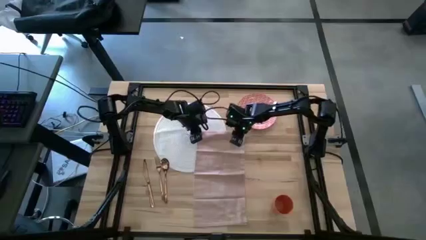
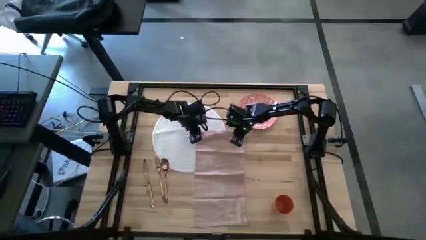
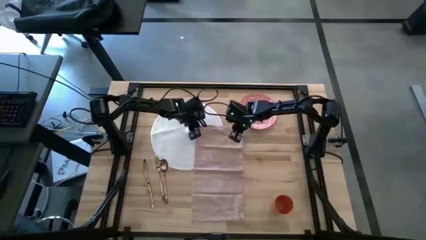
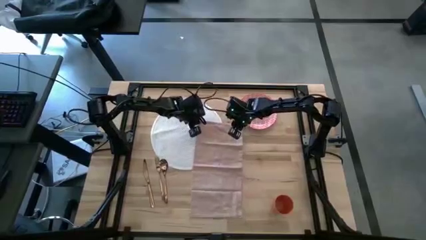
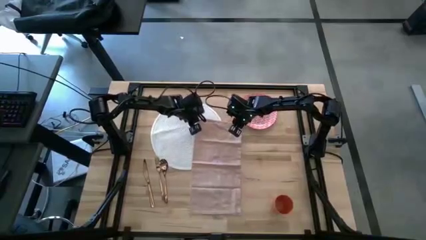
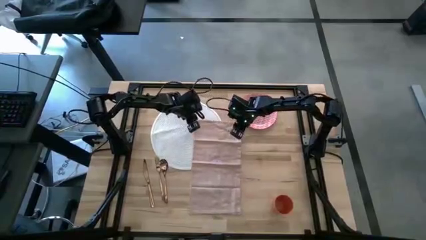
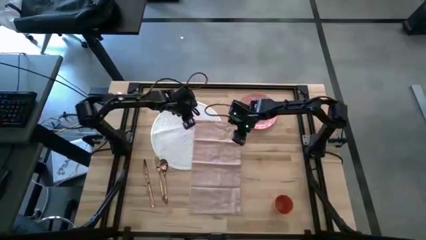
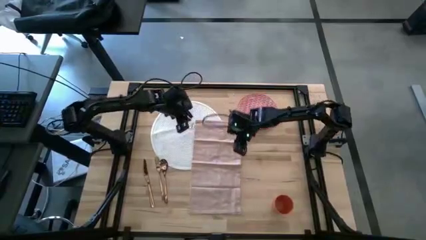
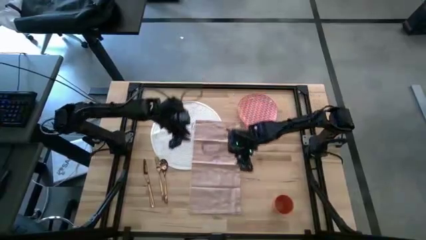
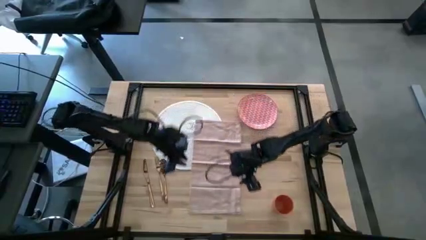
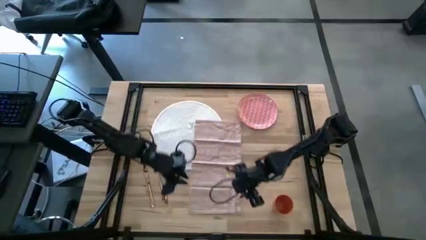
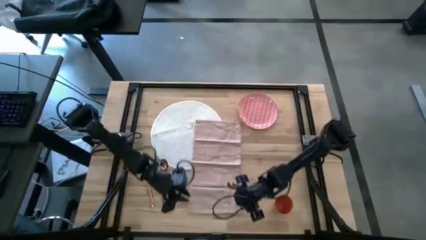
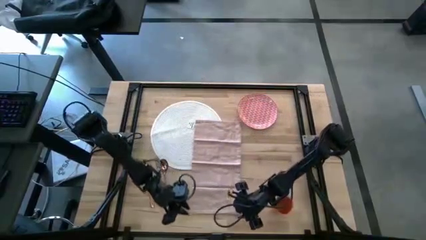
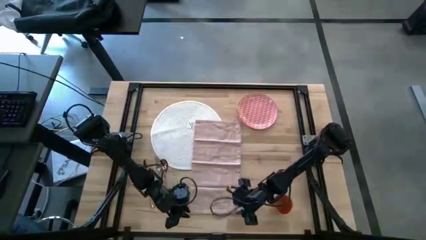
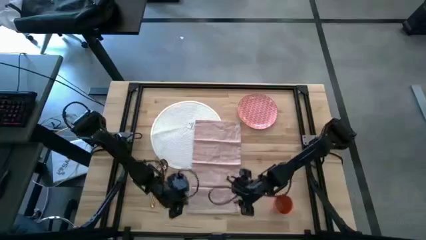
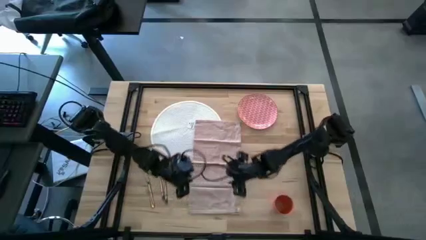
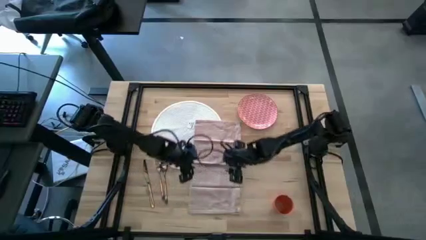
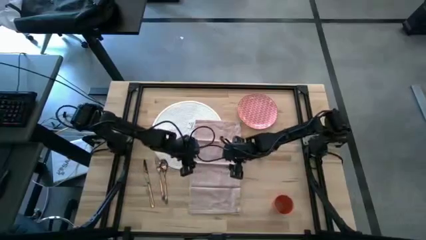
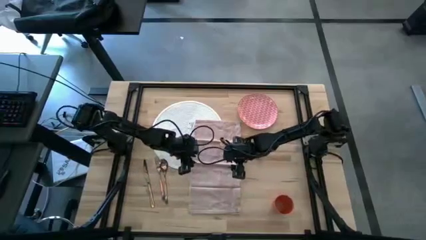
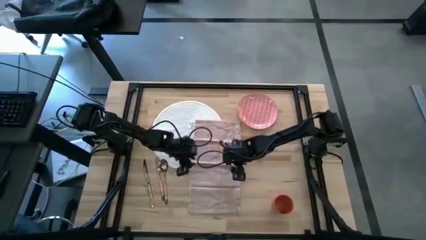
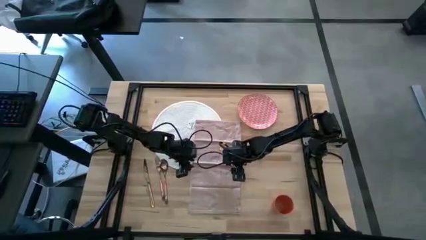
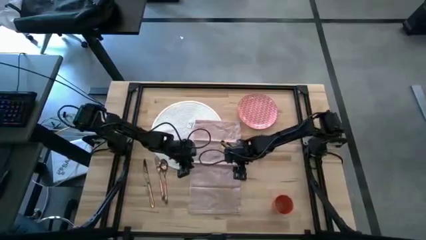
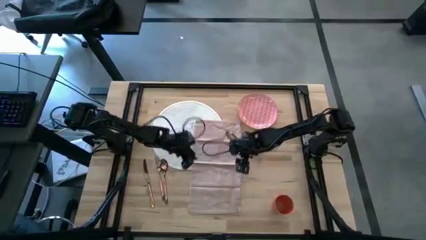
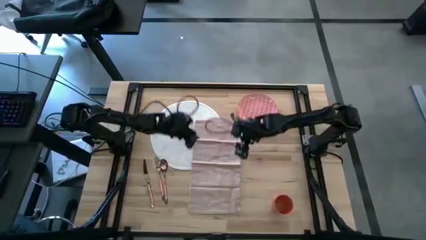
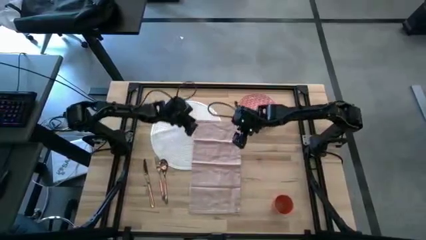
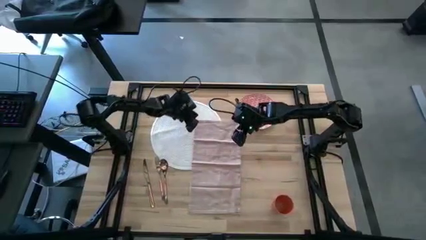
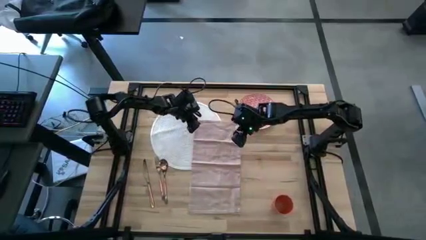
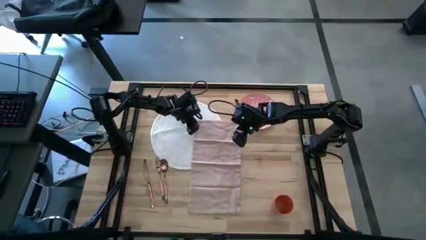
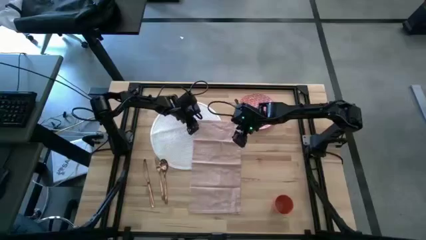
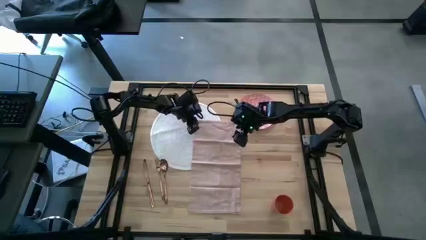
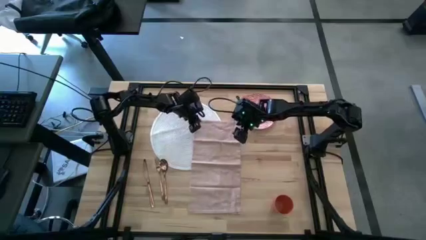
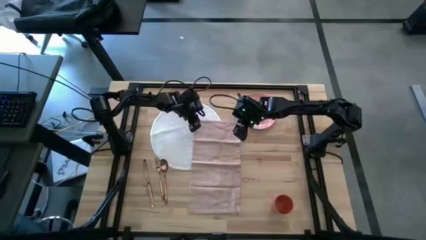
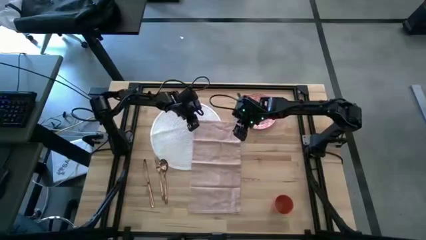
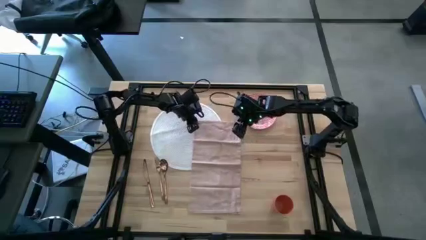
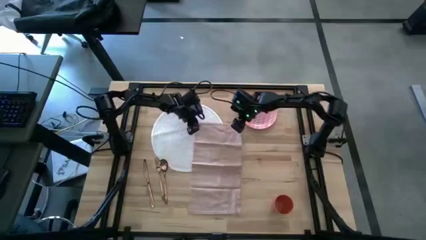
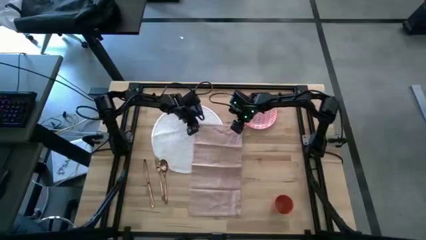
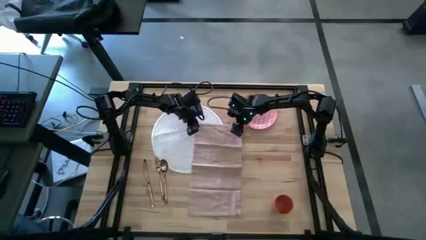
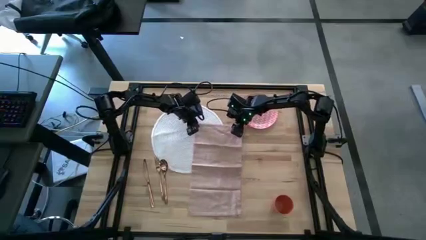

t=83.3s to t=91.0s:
Task: Set table place
Fold the pink napkin

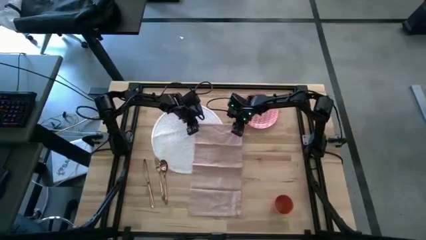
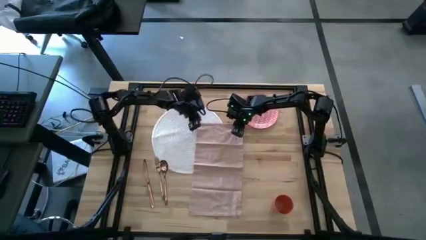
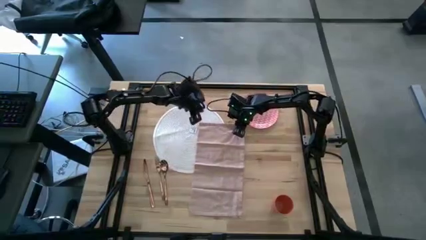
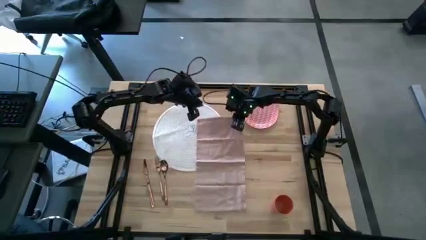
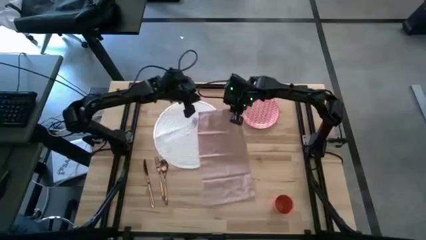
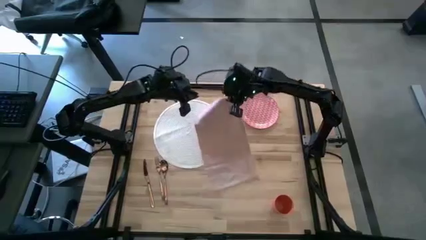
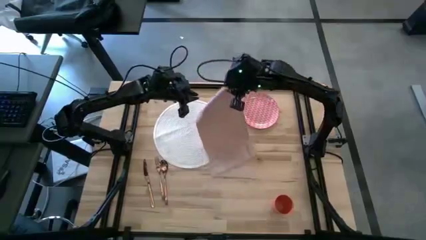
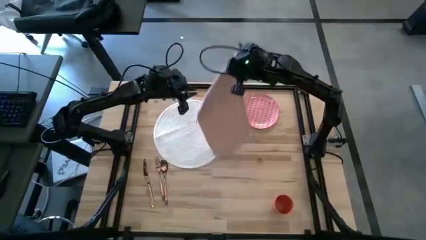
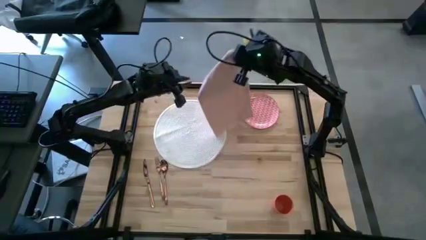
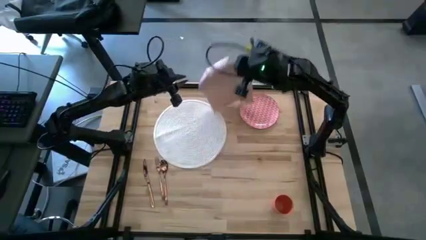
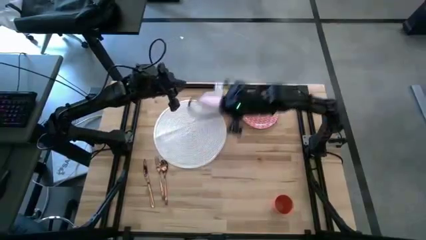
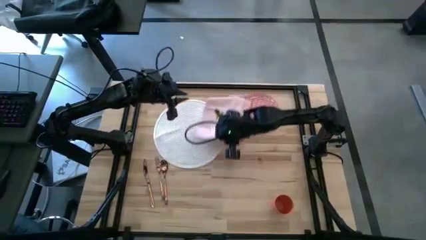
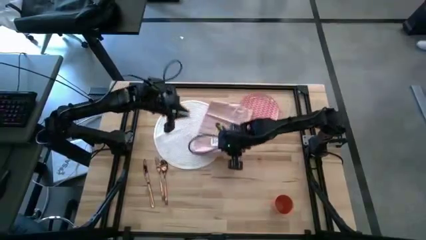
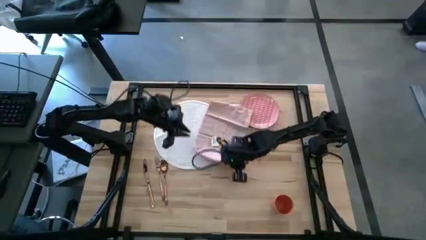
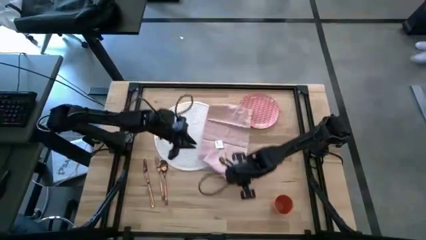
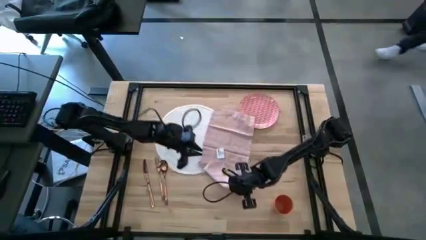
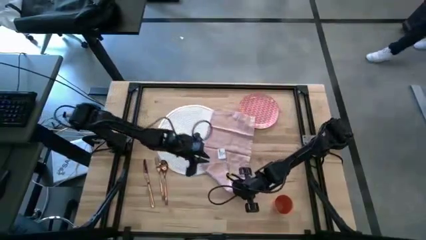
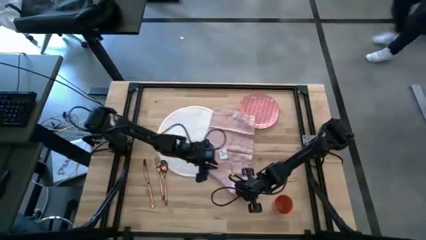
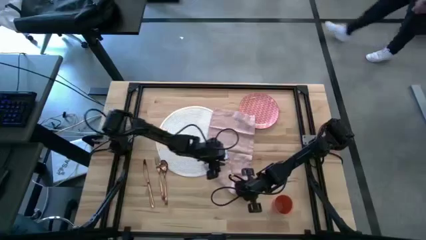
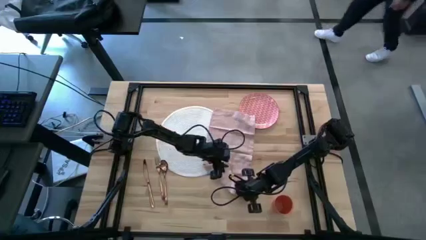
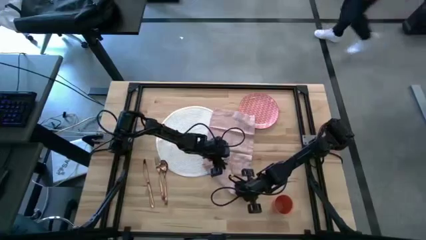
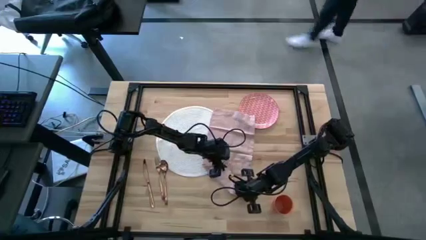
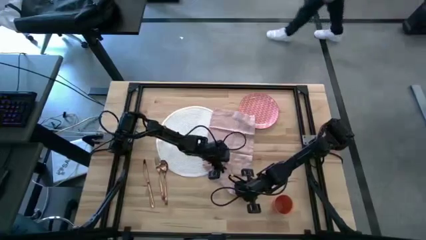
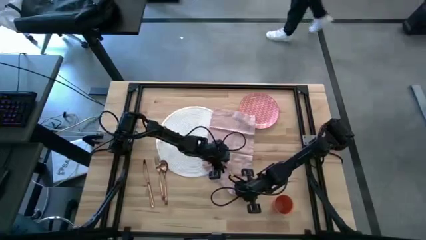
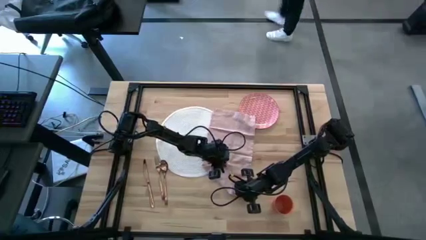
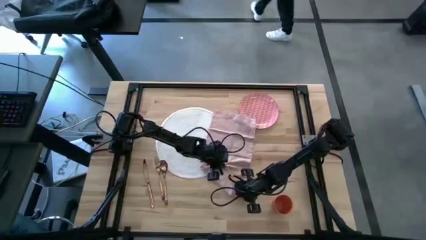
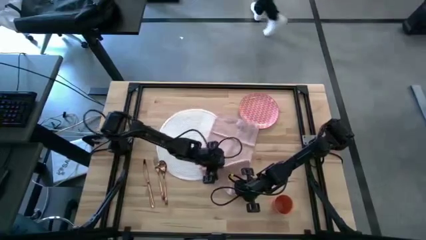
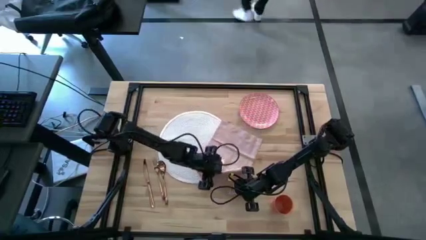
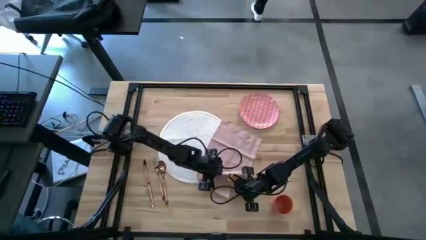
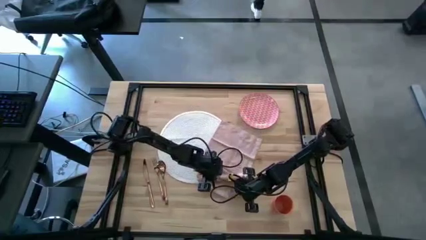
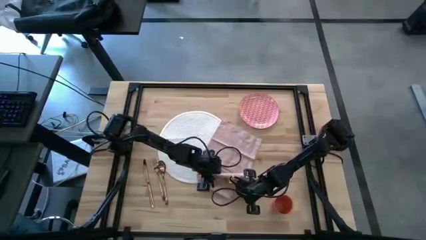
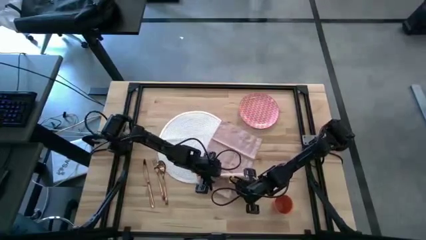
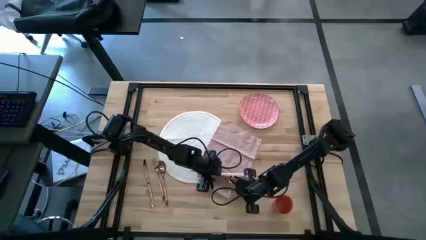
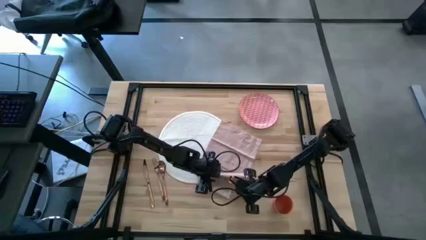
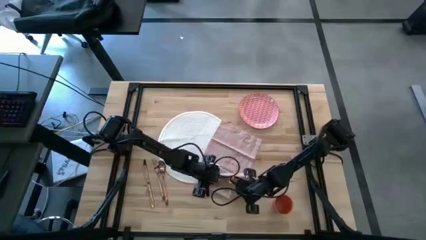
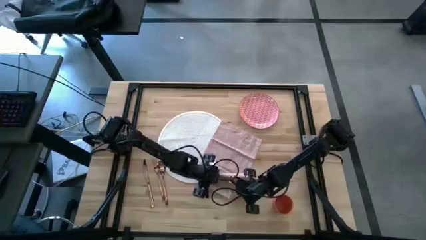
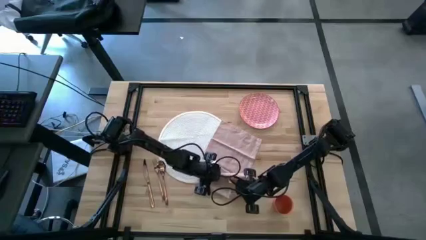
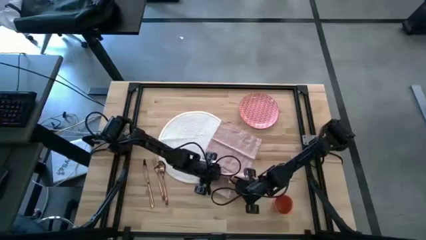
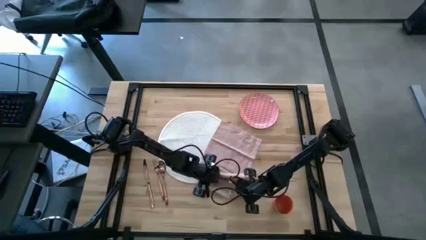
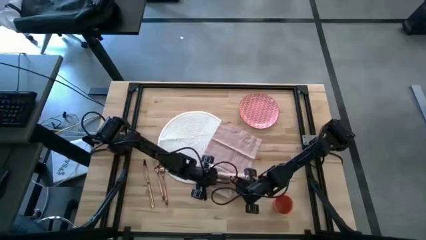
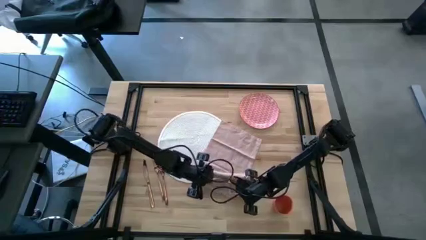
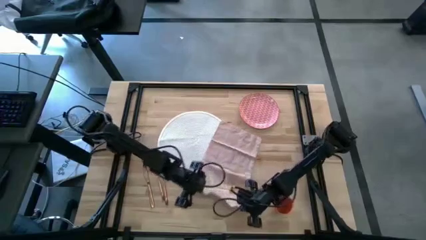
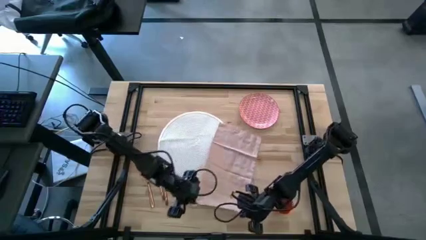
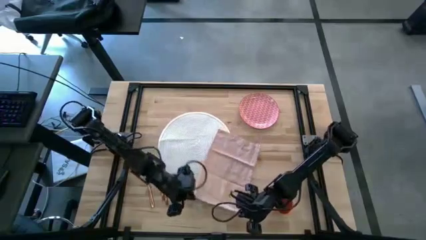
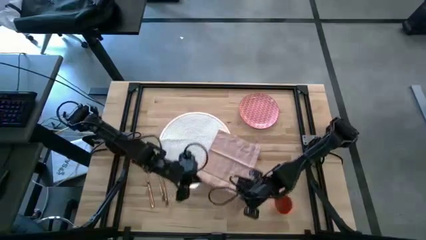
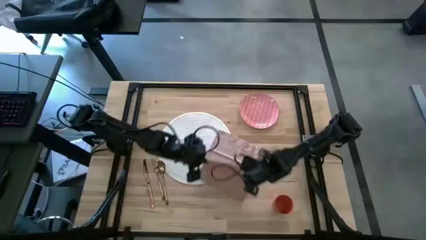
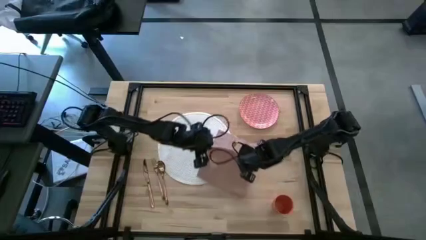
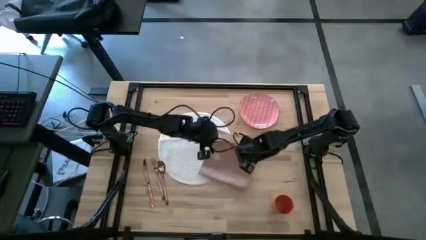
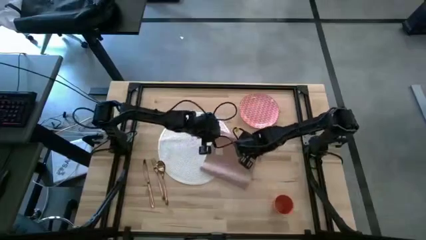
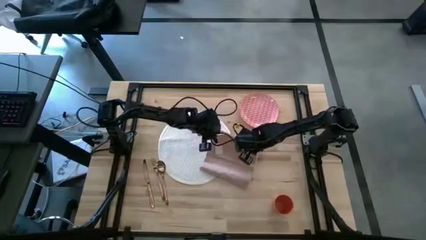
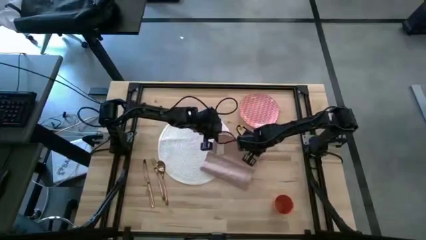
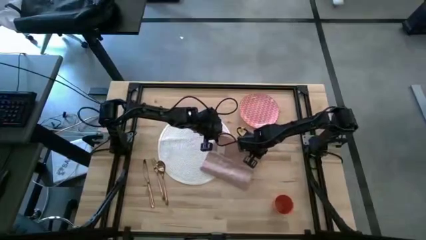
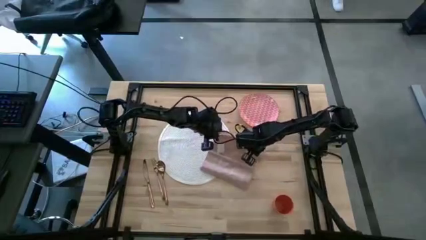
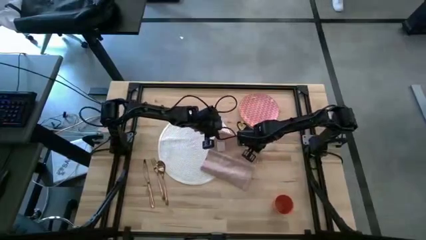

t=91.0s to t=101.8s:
Fold the pink napkin
